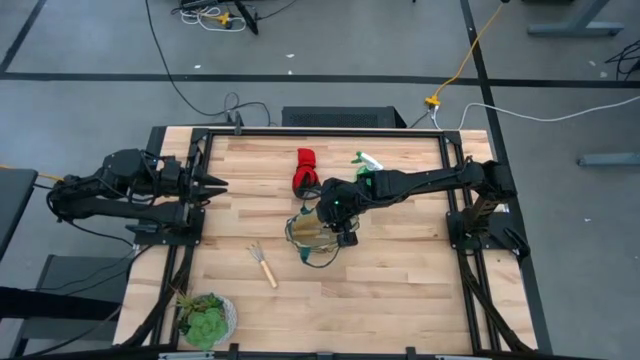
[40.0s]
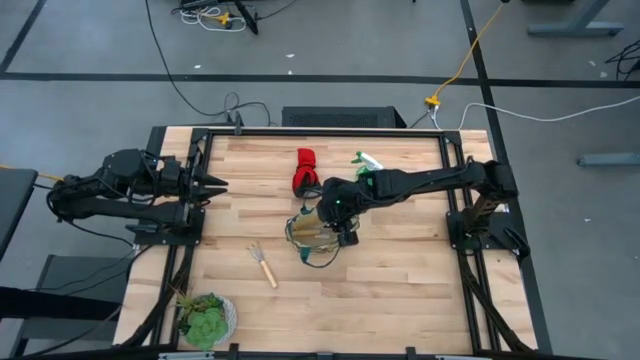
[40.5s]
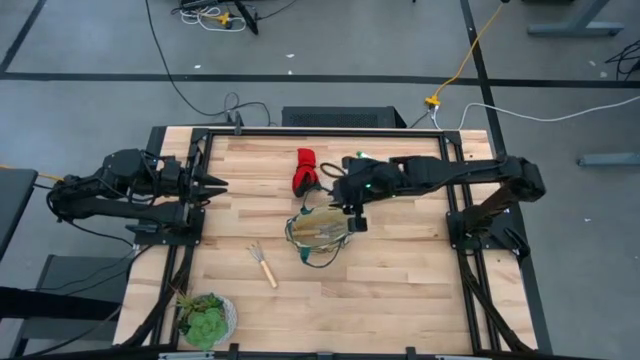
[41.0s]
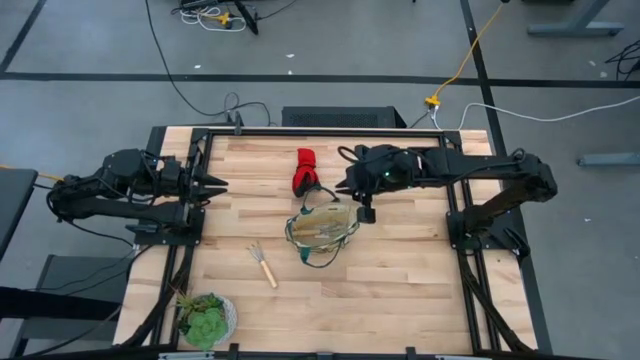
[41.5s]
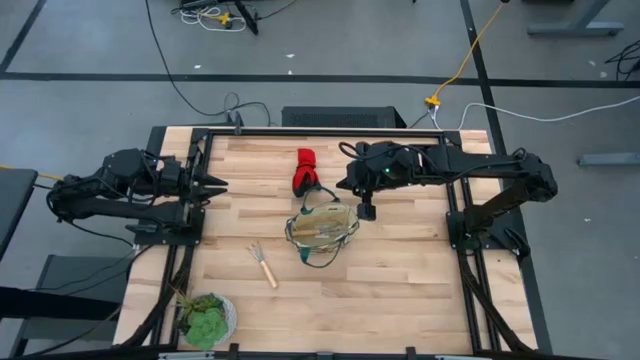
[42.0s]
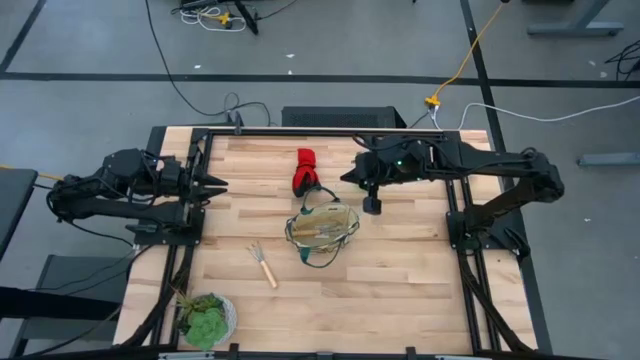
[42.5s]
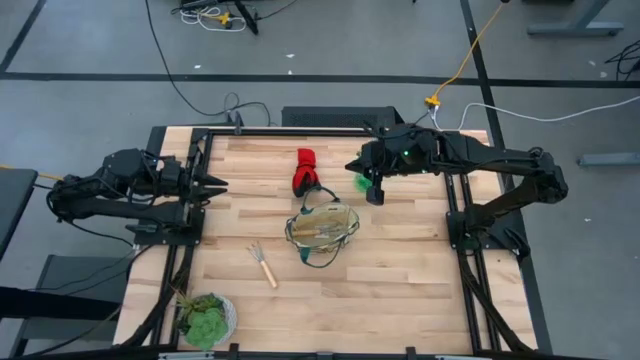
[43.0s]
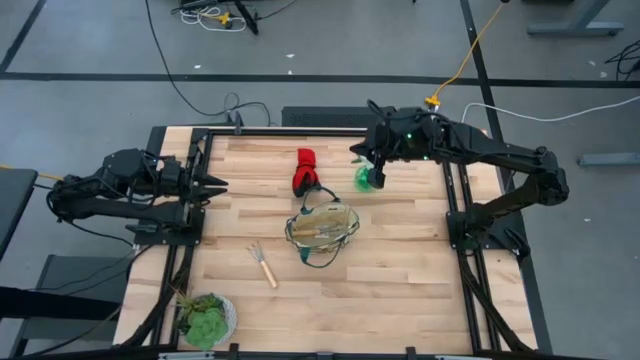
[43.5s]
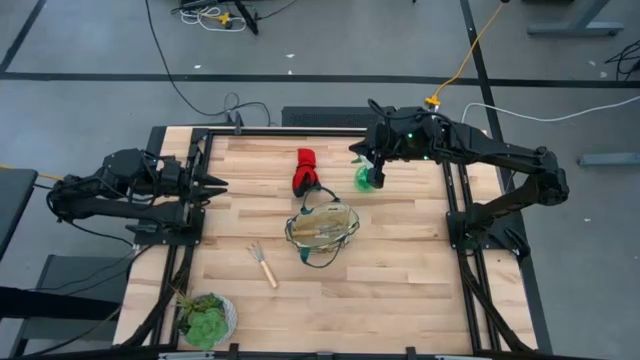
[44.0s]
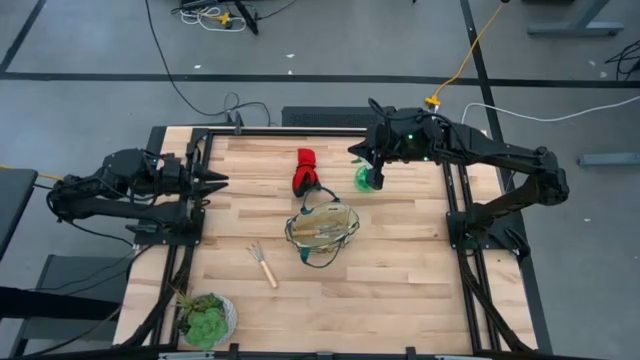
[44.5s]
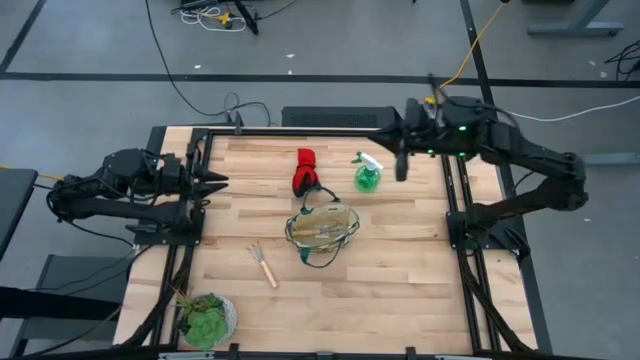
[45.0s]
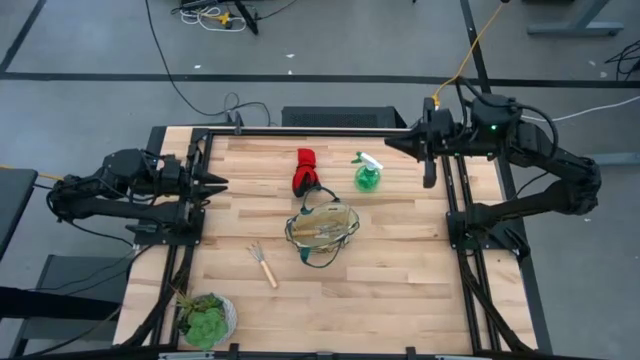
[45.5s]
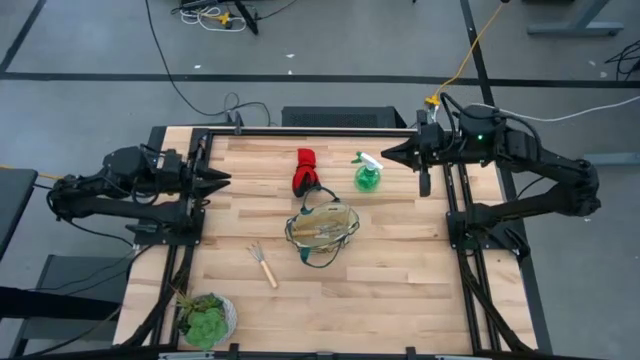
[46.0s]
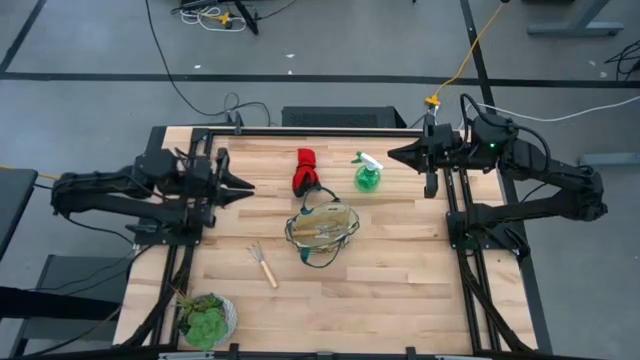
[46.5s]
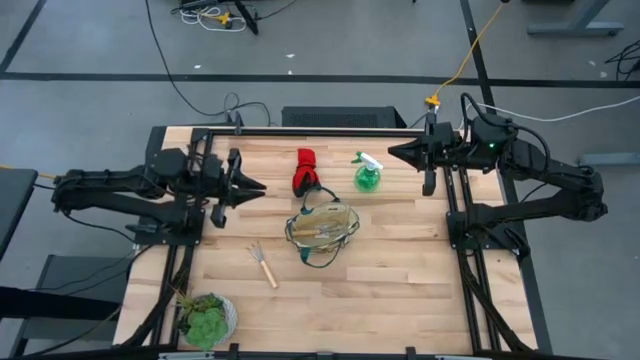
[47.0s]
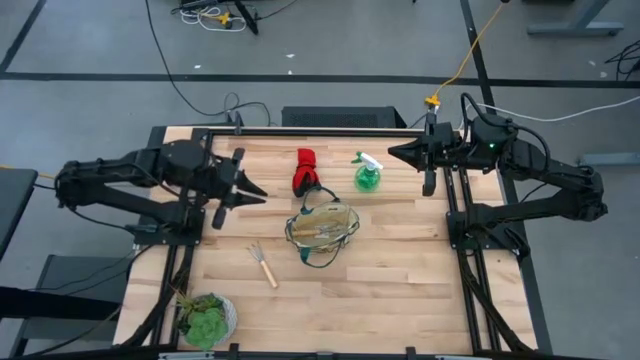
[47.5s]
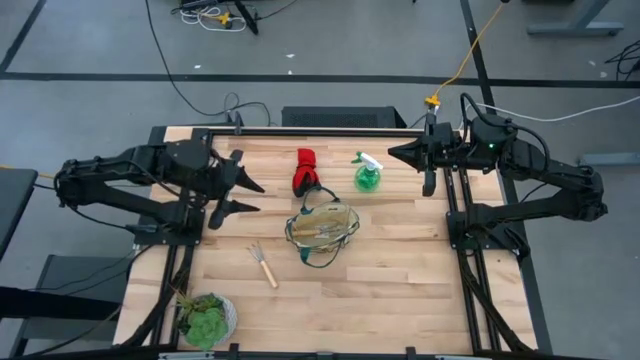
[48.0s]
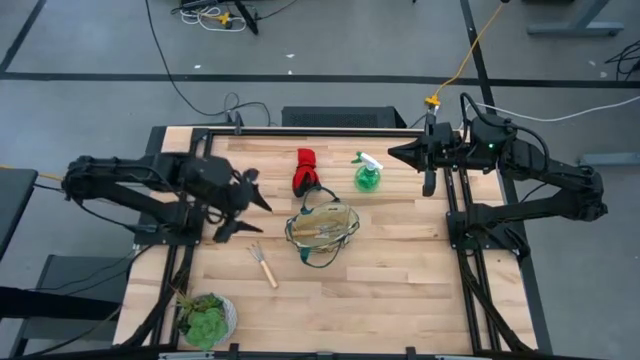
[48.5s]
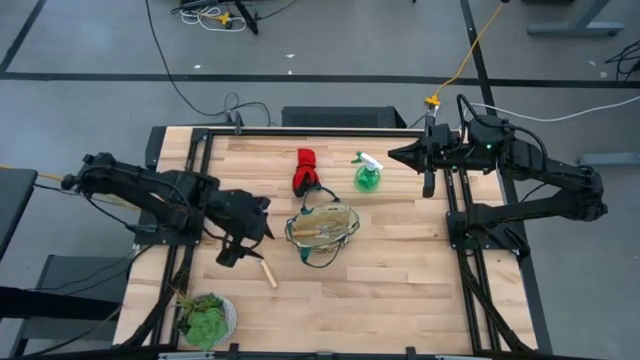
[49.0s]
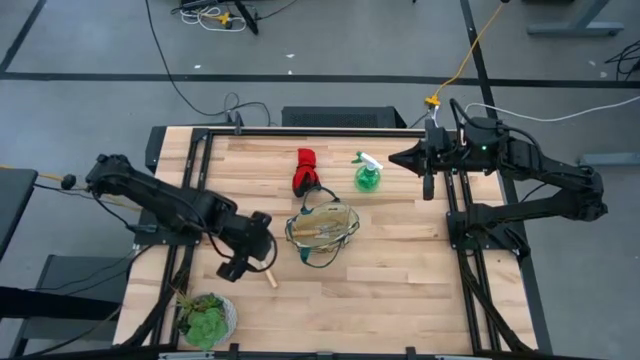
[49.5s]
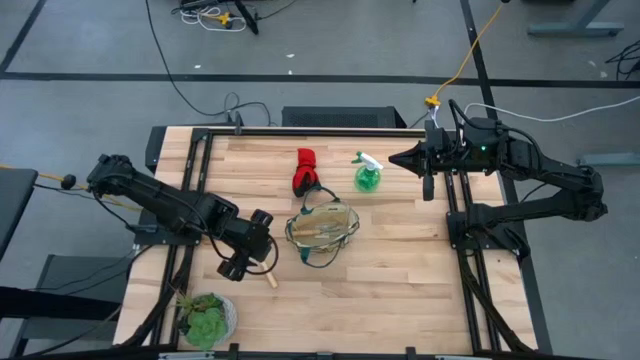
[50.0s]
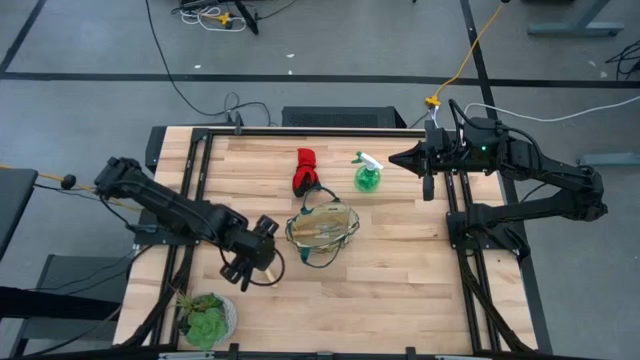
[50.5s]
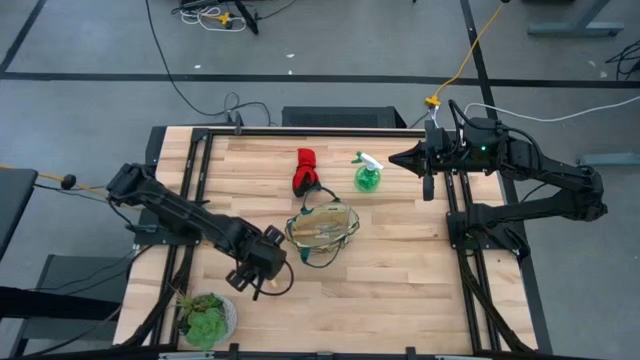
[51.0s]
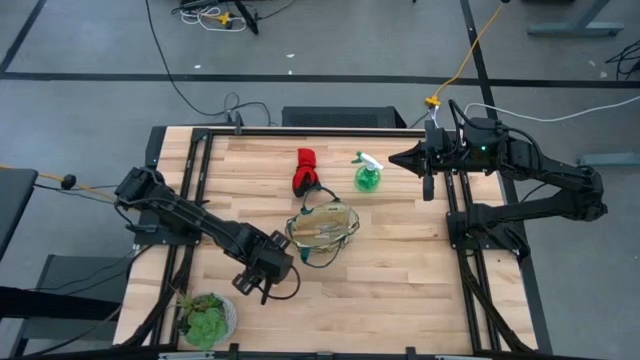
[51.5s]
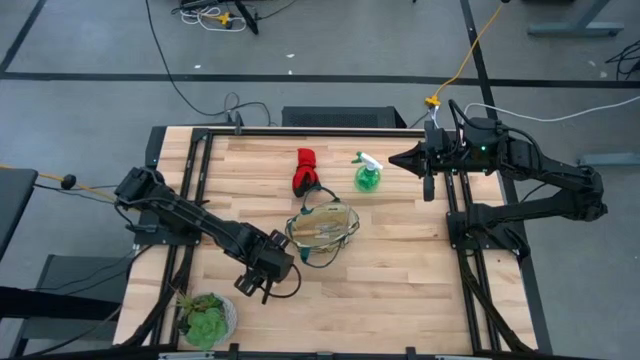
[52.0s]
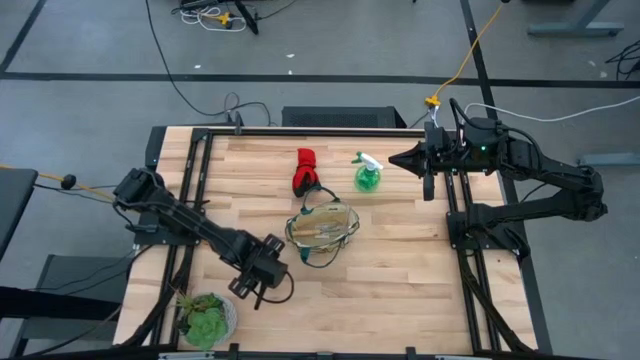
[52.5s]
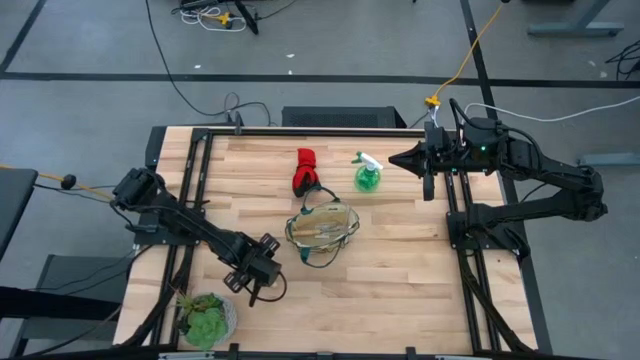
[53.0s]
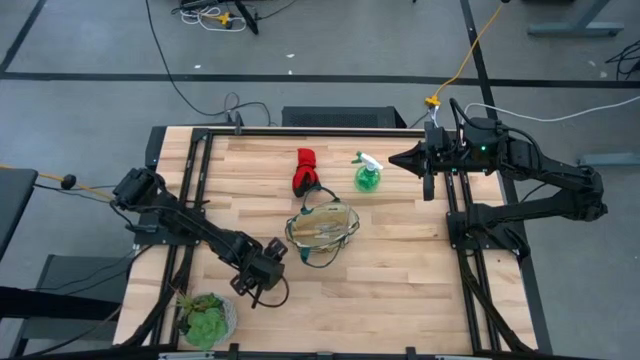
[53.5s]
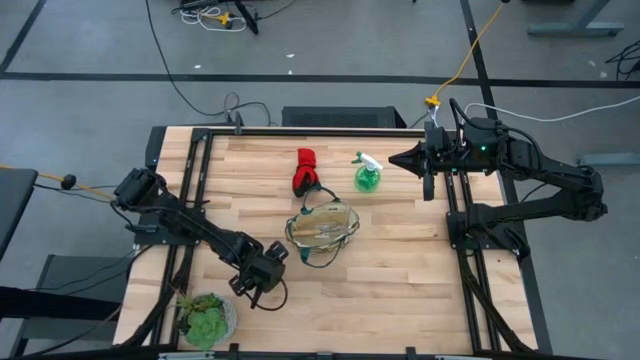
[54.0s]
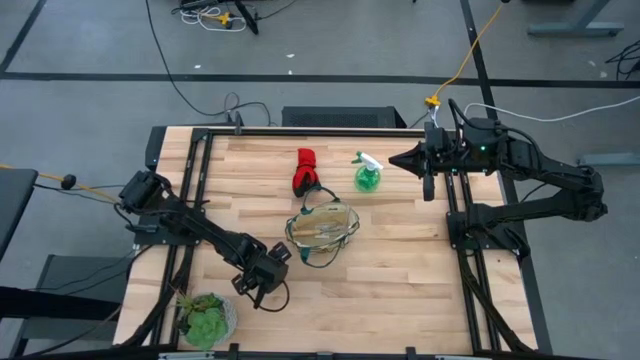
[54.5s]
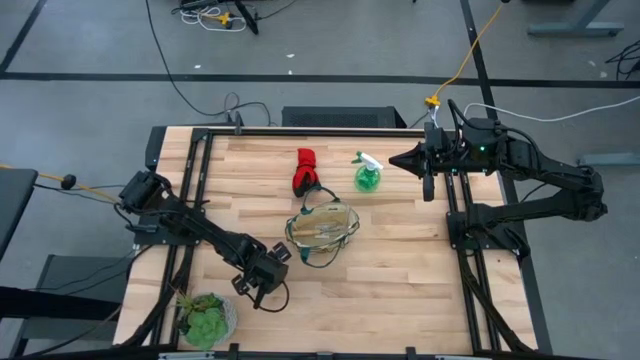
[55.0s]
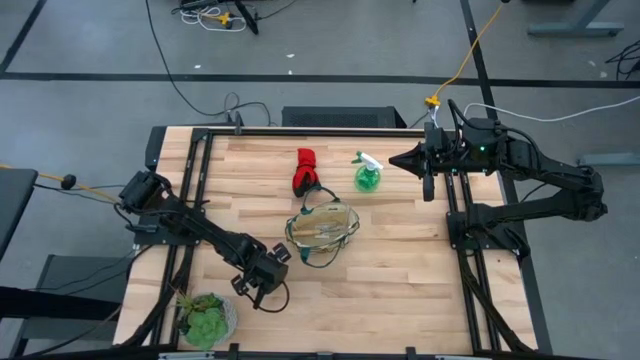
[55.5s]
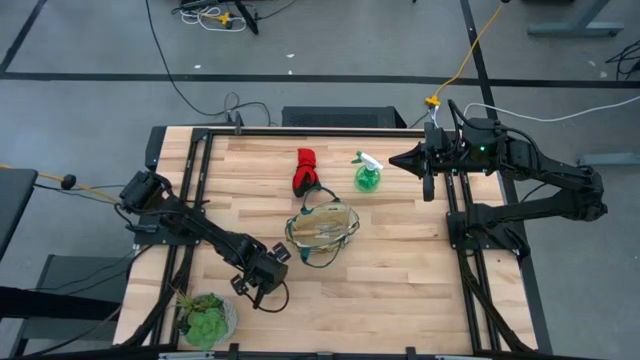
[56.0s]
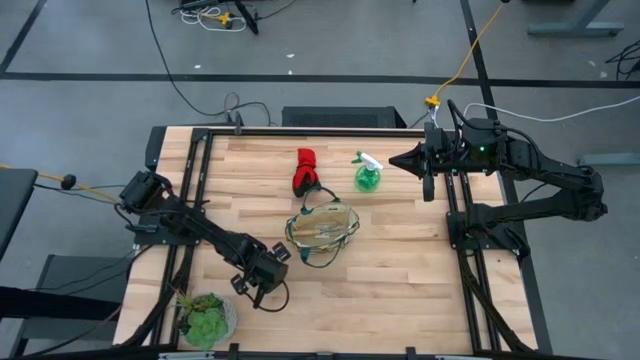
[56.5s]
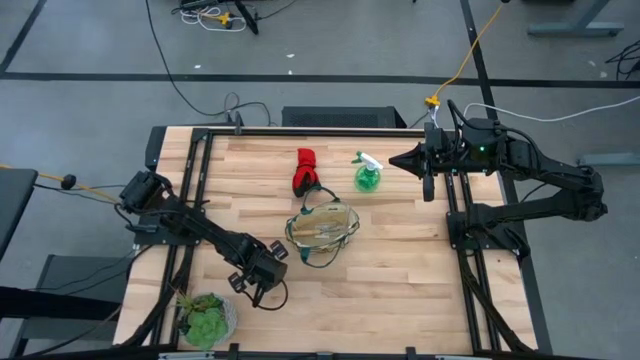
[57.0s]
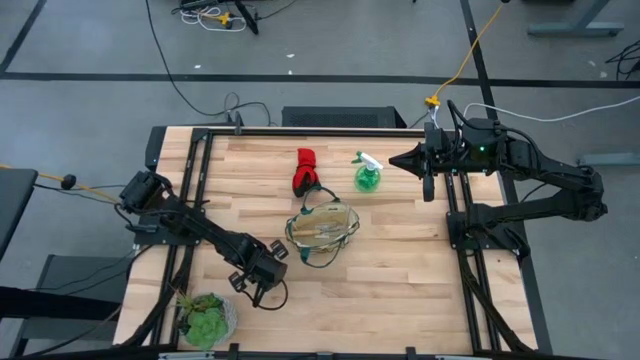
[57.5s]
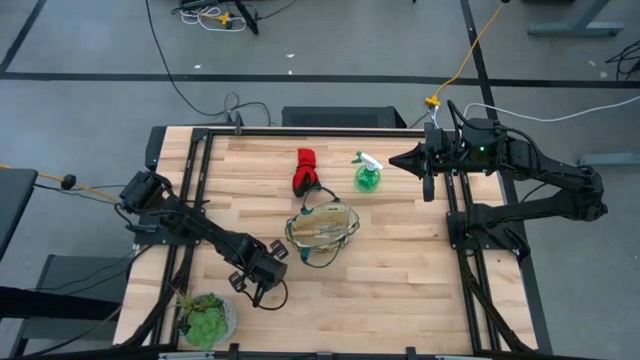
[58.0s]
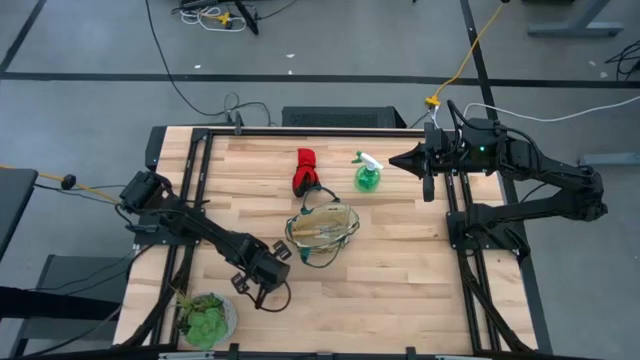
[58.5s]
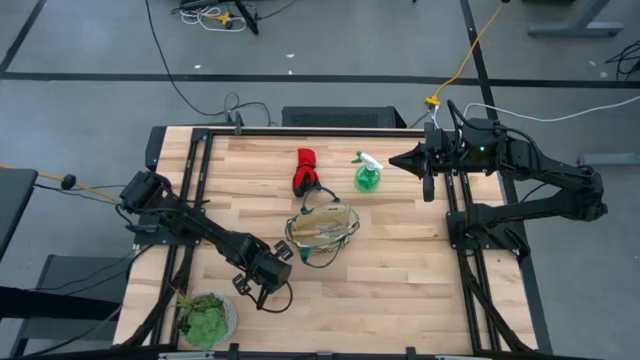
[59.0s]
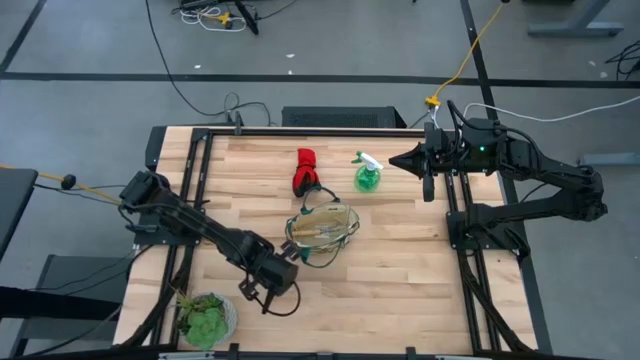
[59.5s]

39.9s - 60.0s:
Task: Pick & Place Garden tools in Gardening bag
Put the light brown trowel into the light brown and green gardening bag

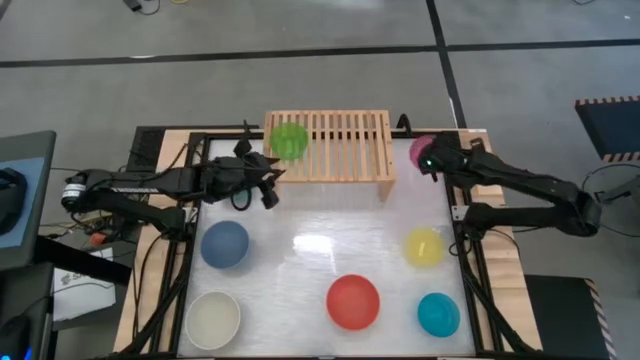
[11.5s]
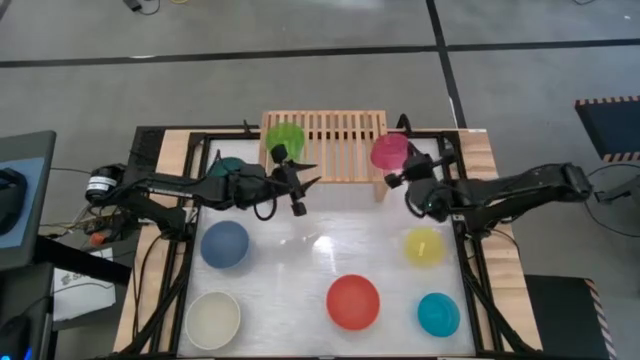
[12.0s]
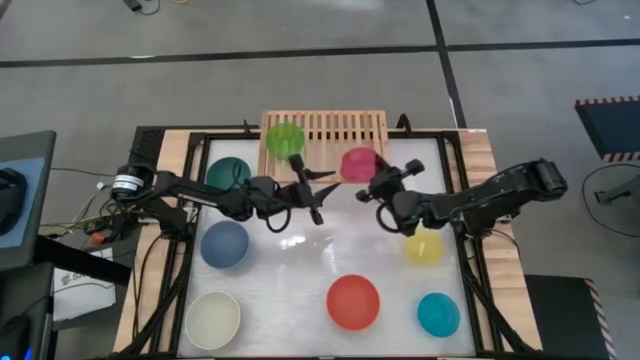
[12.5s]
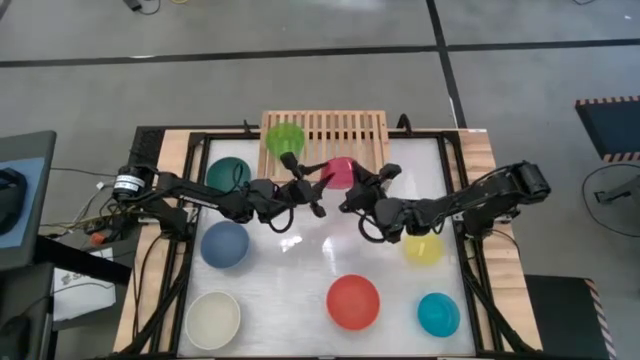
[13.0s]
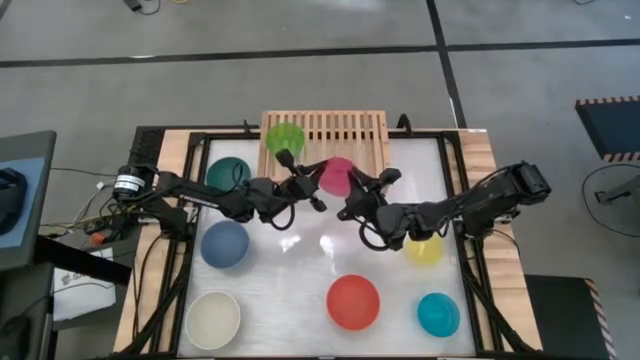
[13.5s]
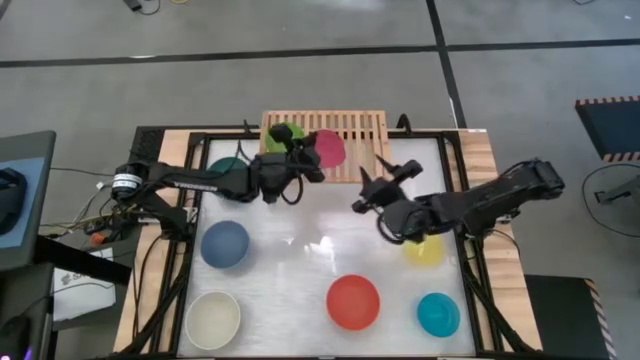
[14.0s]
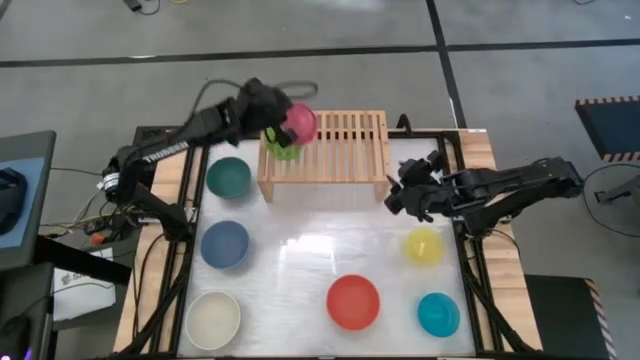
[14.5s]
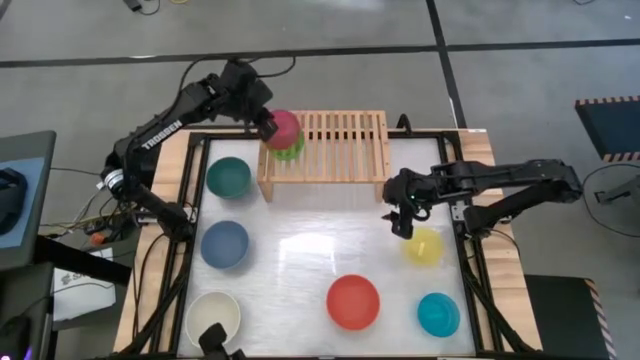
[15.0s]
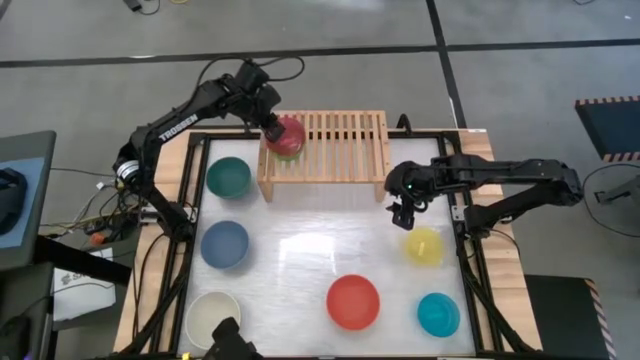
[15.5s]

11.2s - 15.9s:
Task: Place and stack bowls onto a shelf
Stack the red transparent bowl on top of the green transparent bowl
